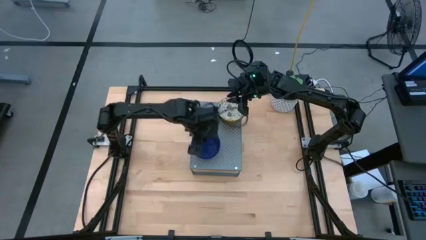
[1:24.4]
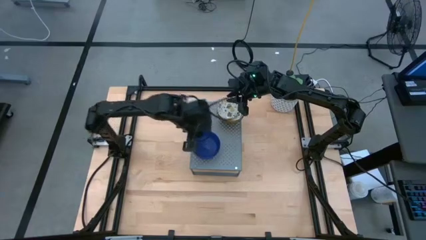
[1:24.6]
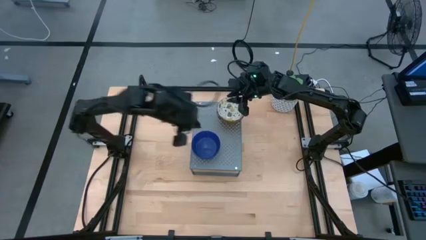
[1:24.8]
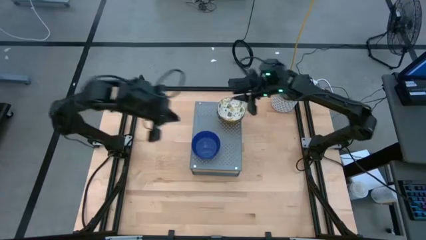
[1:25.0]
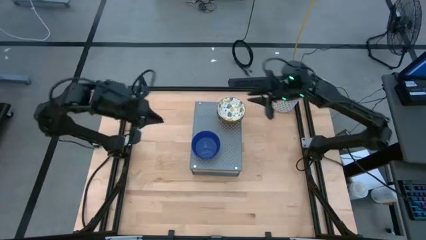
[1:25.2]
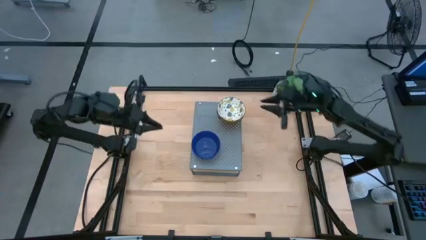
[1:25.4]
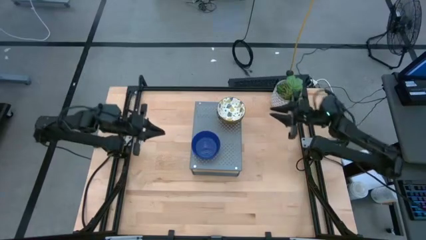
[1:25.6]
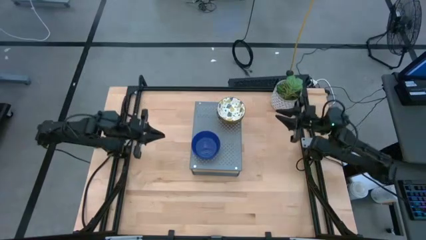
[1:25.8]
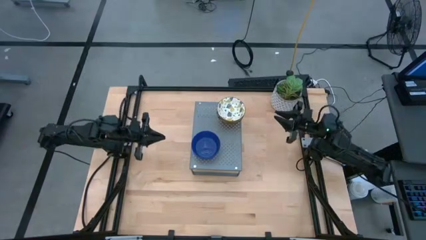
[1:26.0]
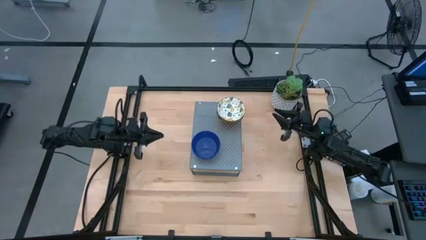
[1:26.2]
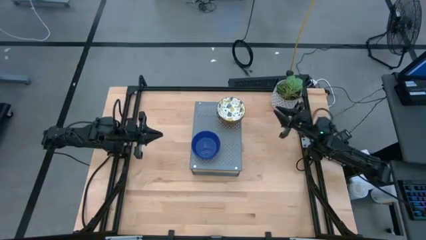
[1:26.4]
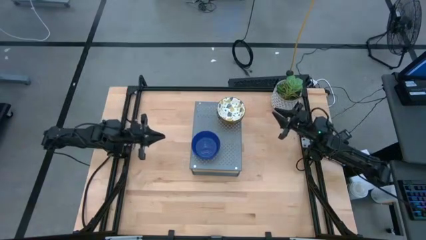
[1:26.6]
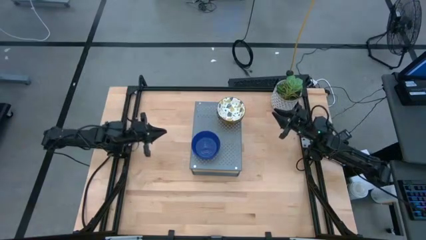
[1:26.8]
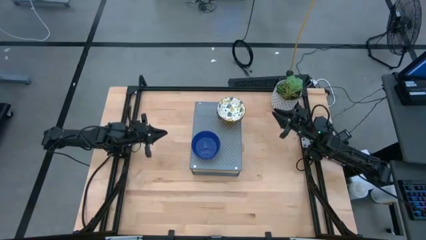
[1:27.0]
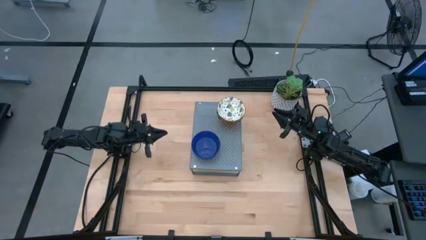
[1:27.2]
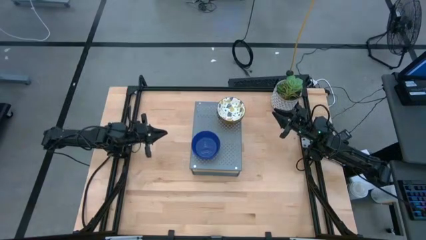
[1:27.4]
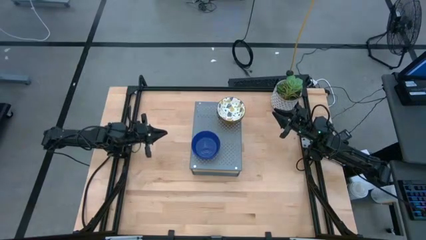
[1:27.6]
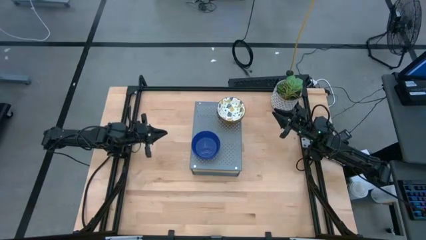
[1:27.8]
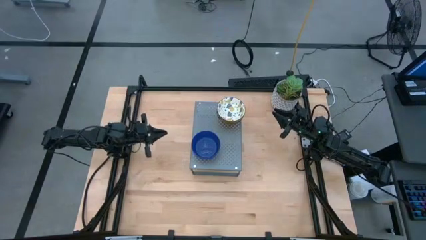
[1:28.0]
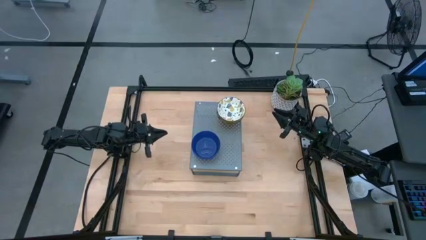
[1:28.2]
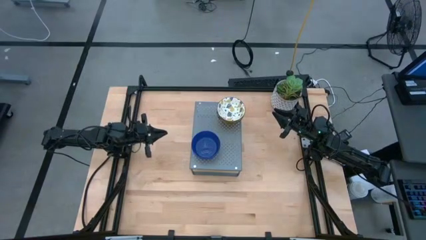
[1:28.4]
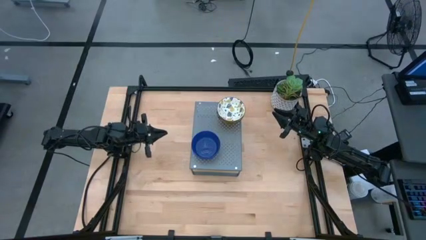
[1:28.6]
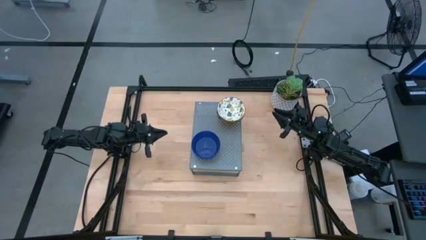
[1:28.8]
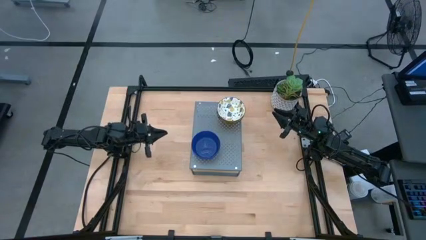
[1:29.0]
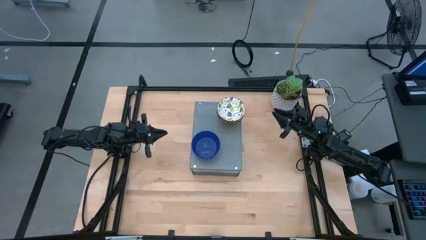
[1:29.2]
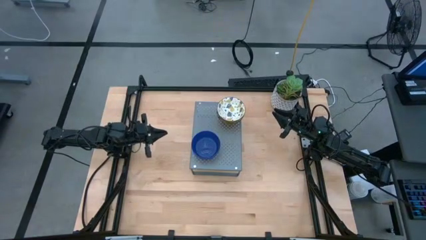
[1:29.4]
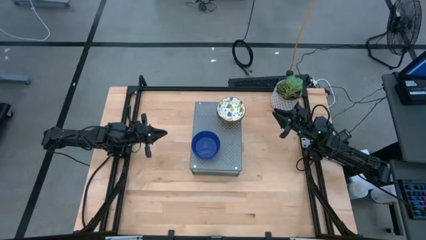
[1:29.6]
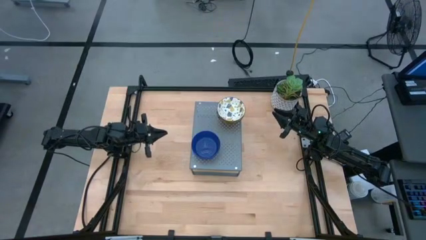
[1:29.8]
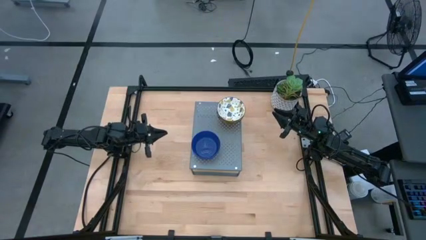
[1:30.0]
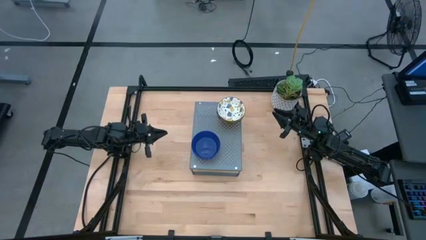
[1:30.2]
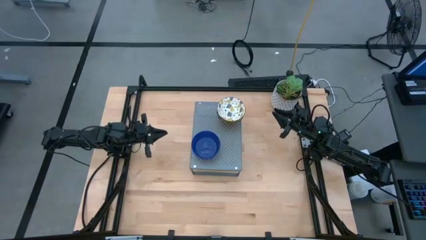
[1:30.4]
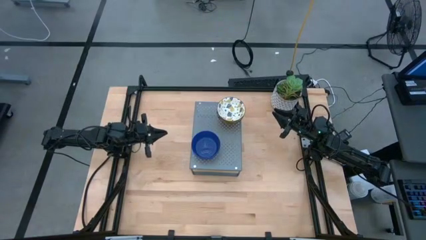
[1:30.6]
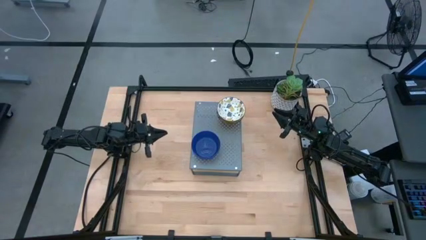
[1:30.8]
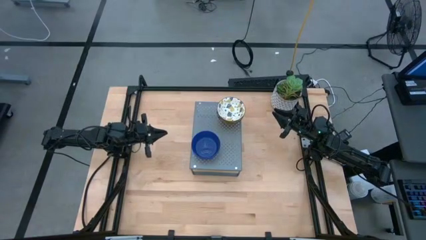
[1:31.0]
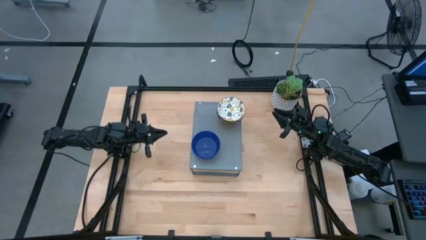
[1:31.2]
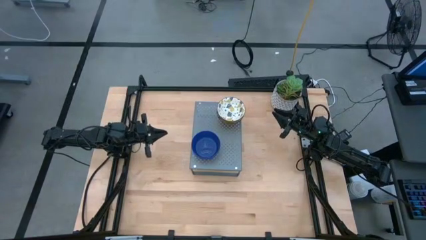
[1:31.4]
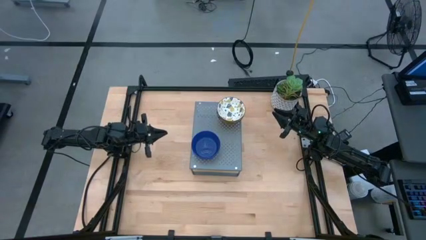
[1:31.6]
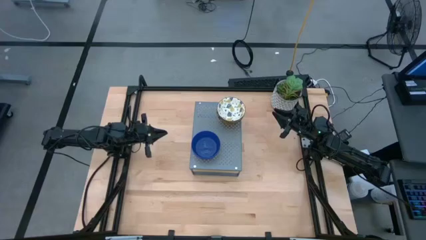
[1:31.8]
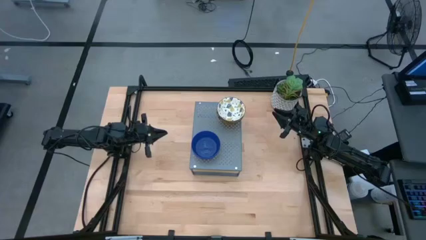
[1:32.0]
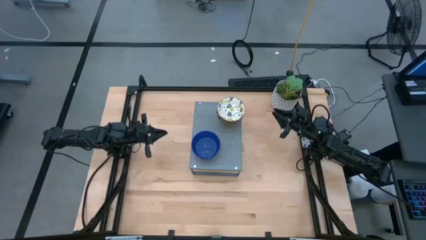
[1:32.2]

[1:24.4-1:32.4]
Task: Pick & Place Mini bowls
Return to Home Position

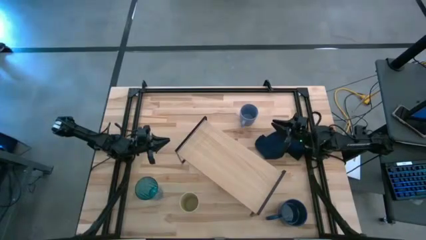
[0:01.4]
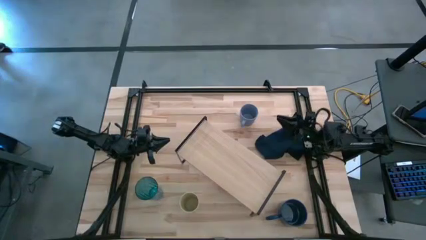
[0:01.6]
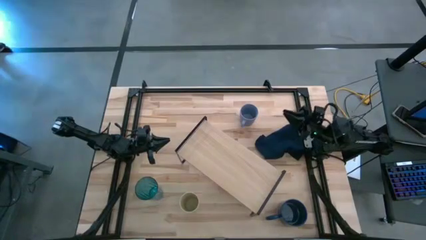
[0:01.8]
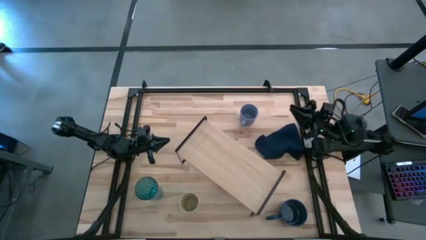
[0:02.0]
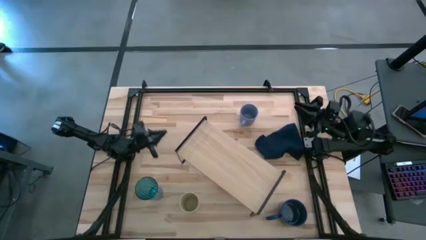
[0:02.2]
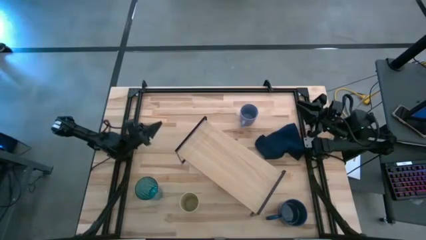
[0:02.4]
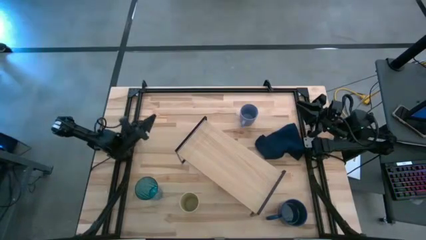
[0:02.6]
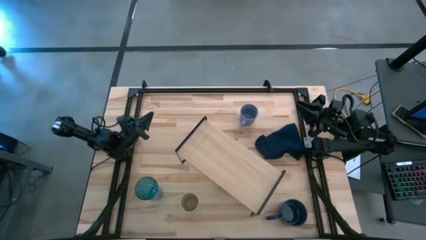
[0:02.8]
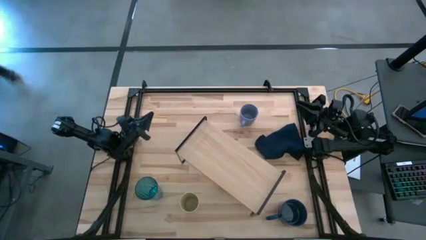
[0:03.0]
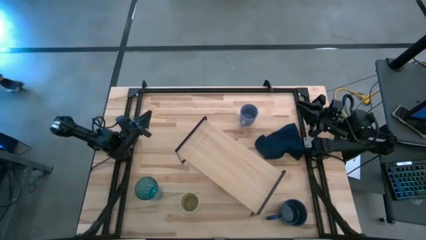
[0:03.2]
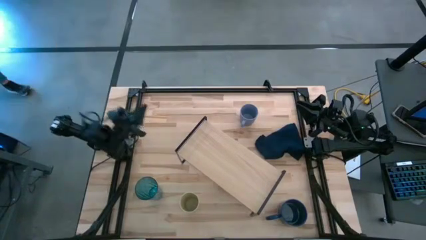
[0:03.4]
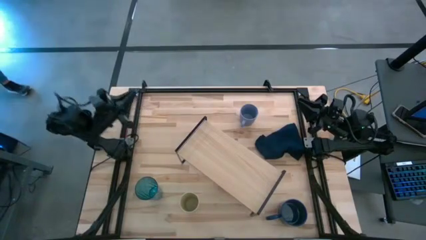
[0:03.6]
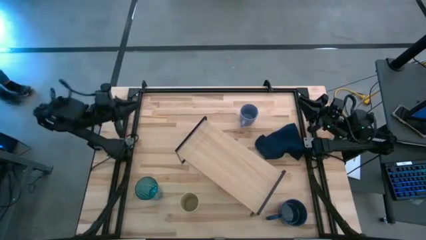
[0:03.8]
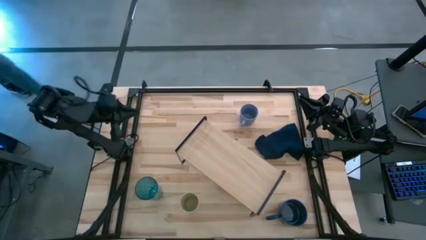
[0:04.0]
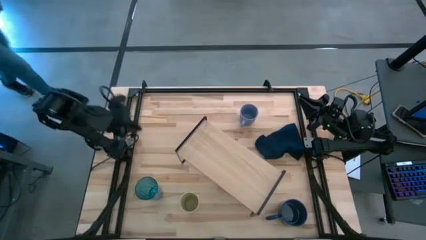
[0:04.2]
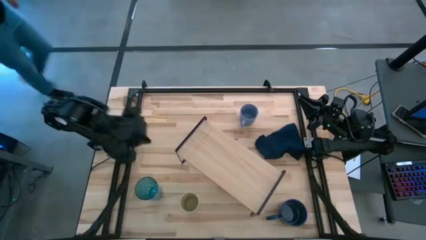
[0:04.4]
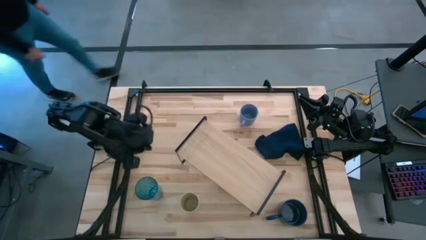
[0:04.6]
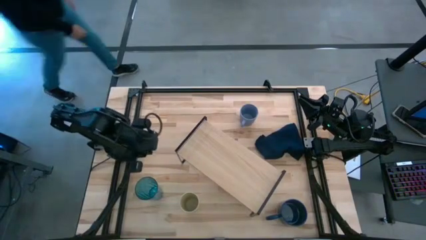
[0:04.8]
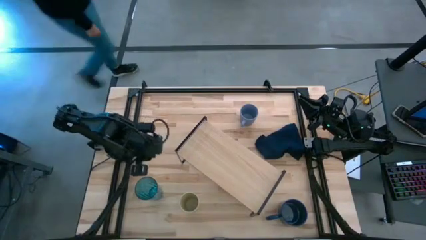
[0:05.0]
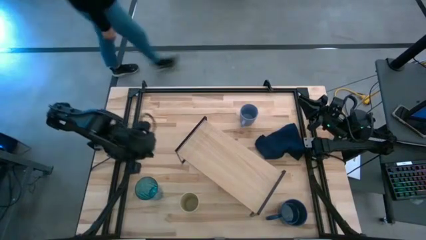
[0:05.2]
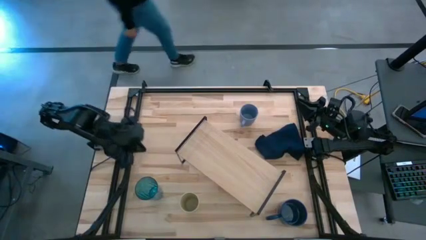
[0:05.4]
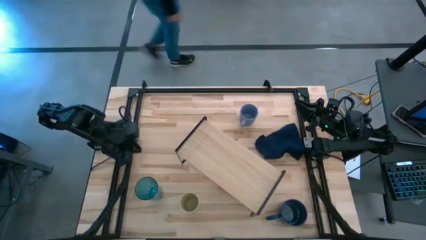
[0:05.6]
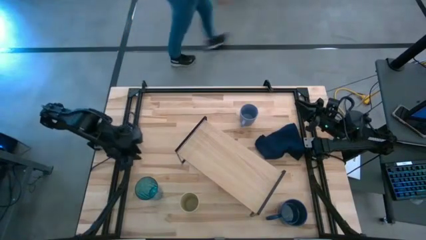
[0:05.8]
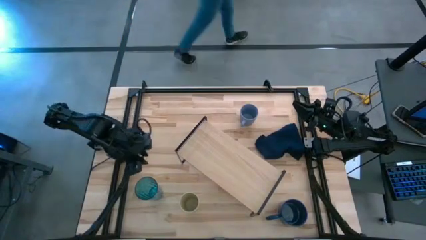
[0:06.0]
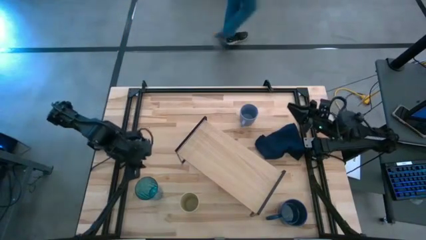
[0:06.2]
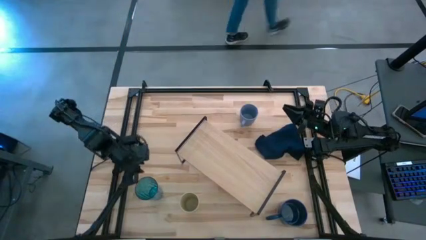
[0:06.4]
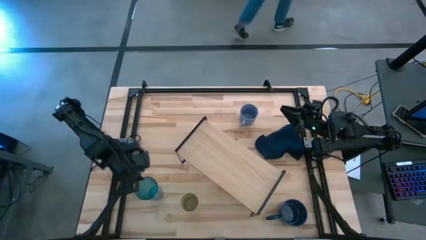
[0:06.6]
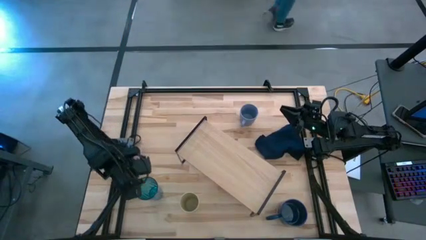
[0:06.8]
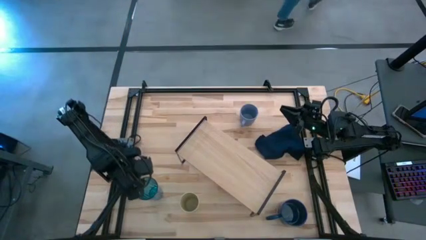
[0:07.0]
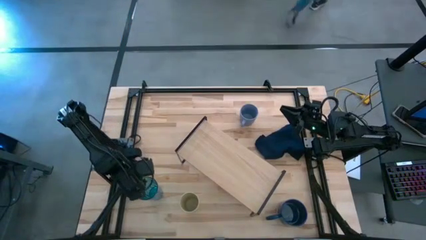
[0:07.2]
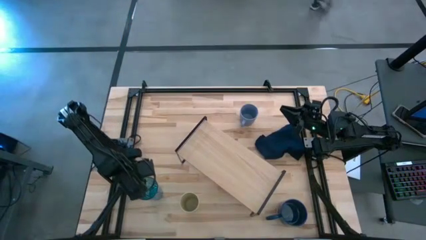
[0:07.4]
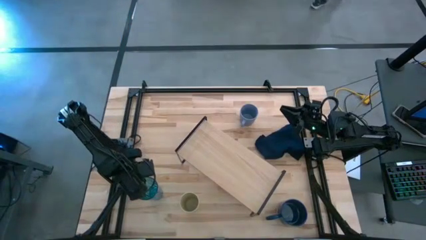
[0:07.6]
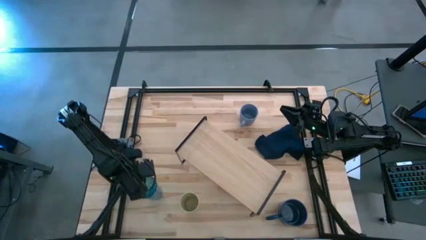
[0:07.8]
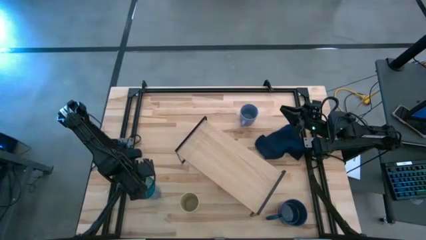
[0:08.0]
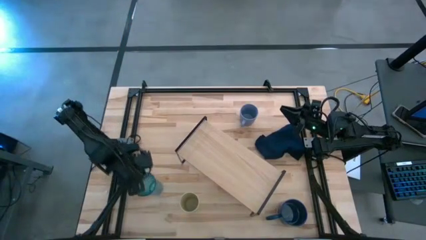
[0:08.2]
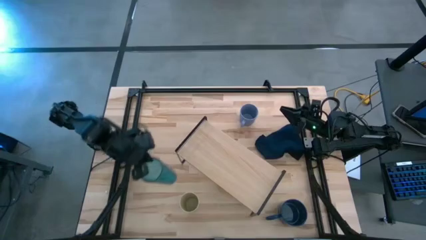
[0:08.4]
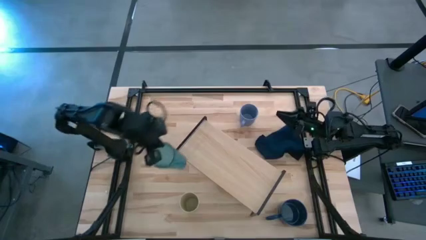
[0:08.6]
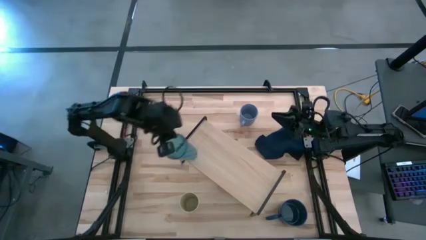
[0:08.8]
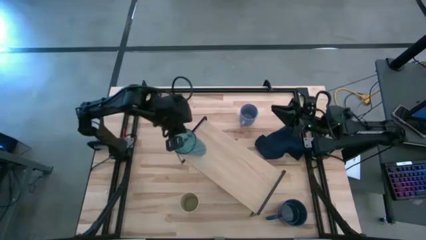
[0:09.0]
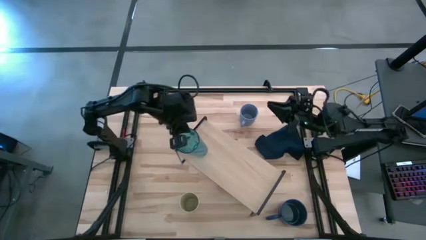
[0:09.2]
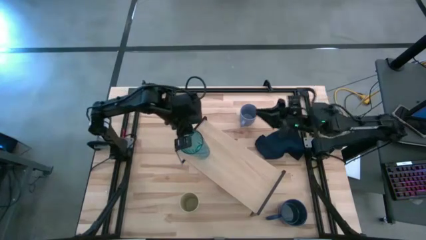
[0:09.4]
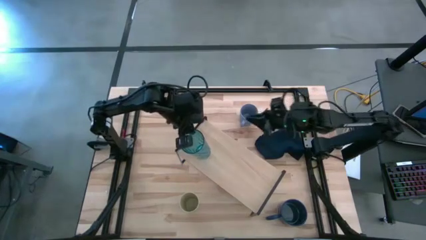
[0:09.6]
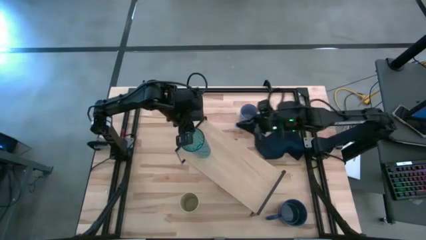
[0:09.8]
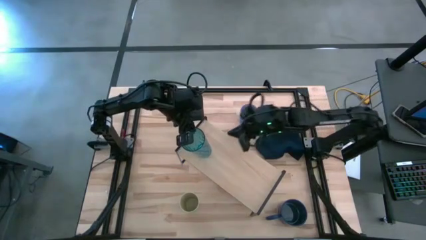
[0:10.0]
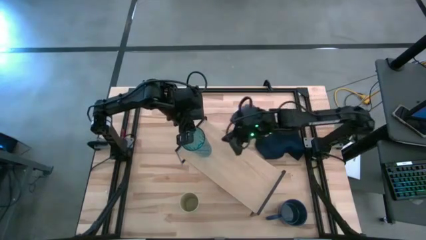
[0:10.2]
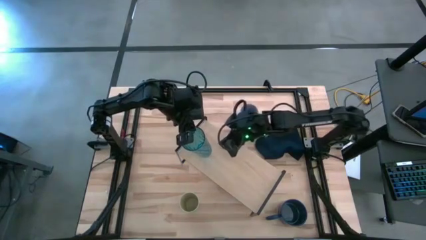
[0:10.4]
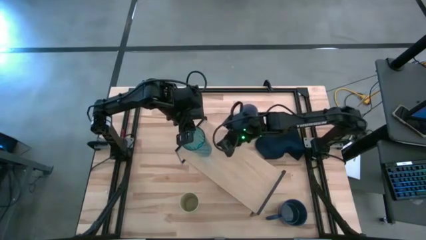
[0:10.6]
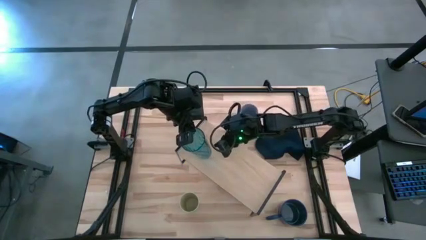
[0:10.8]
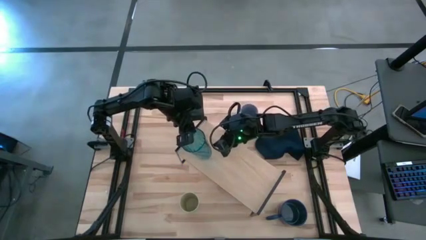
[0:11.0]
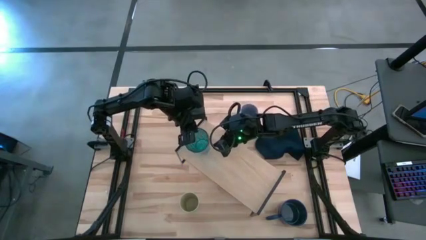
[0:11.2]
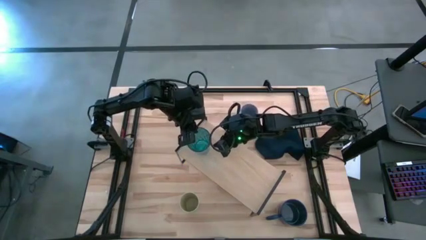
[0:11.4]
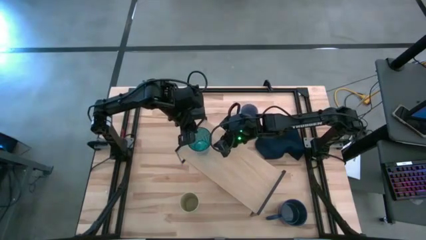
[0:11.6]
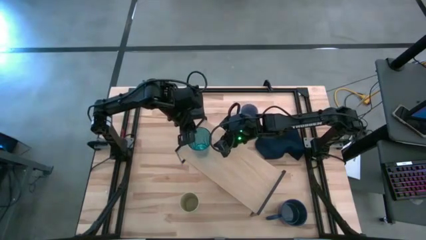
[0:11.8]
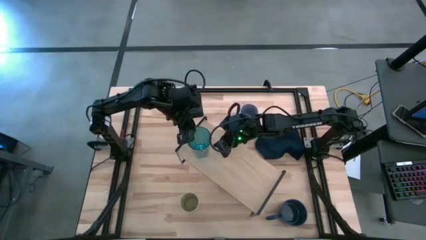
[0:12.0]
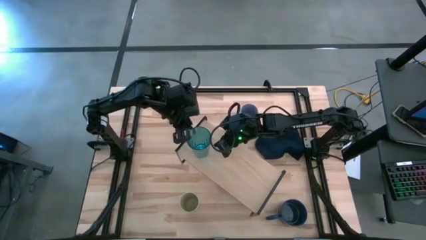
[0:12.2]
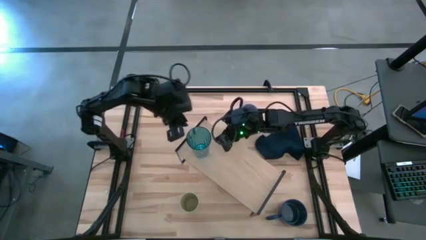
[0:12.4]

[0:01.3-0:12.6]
Task: Stack small to large cups/mugs on shelf
Put the blue transparent cup on the shelf
